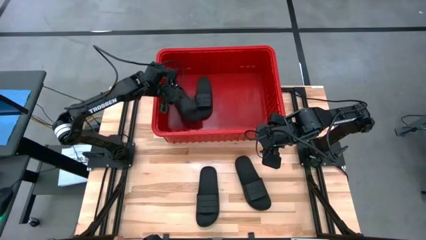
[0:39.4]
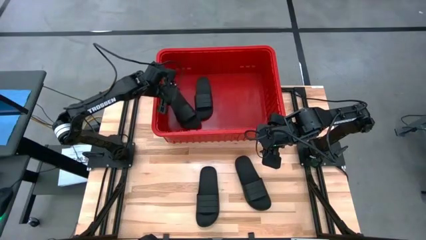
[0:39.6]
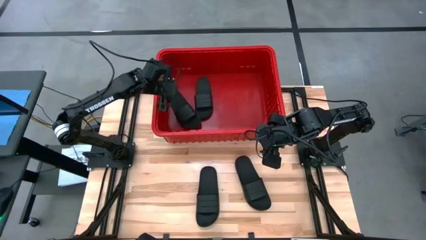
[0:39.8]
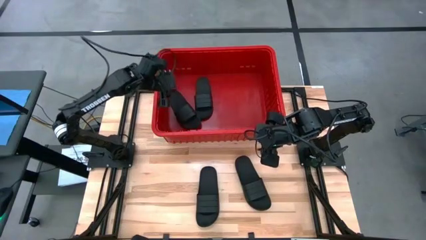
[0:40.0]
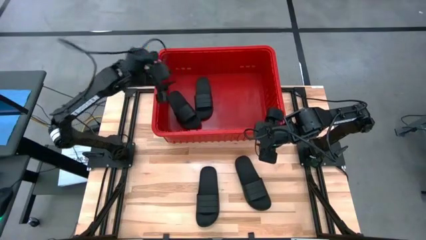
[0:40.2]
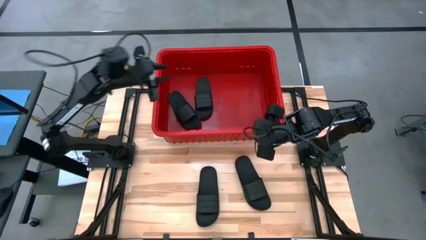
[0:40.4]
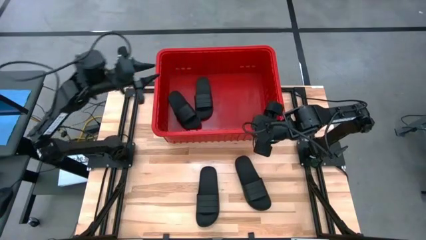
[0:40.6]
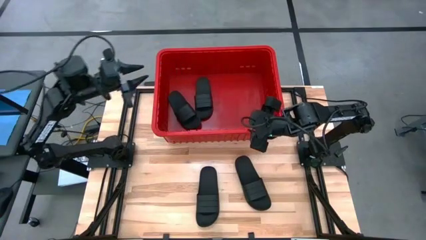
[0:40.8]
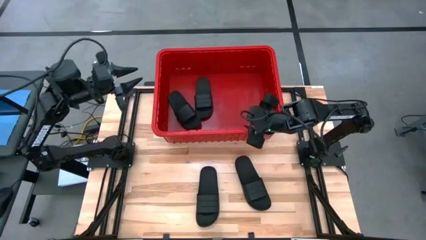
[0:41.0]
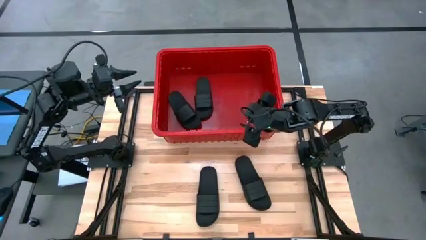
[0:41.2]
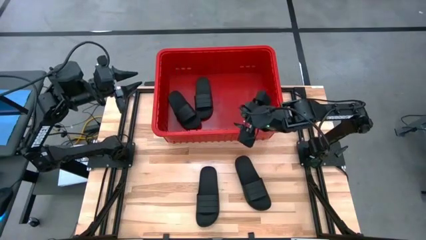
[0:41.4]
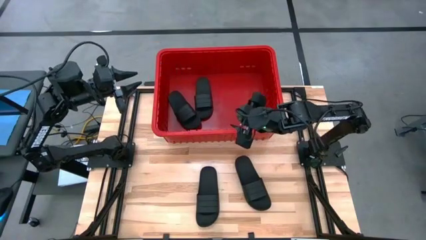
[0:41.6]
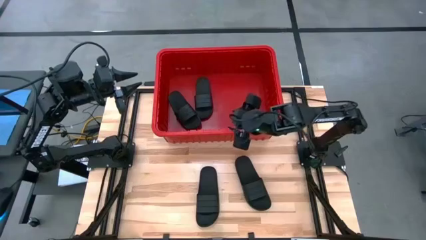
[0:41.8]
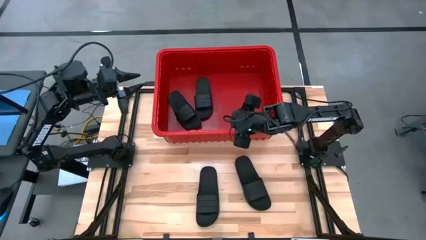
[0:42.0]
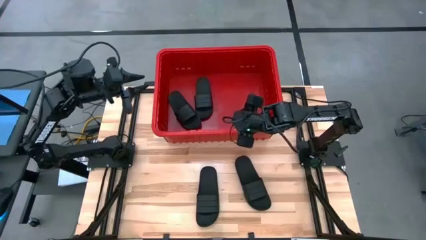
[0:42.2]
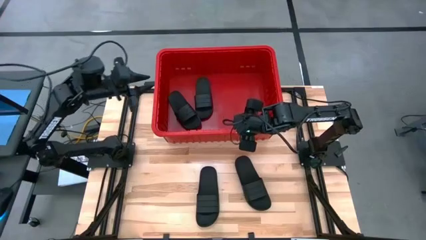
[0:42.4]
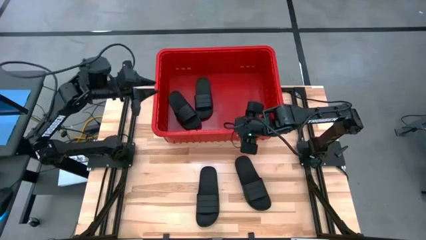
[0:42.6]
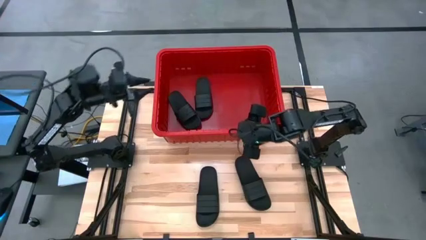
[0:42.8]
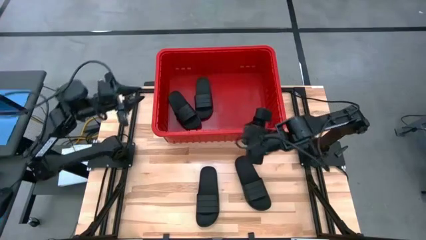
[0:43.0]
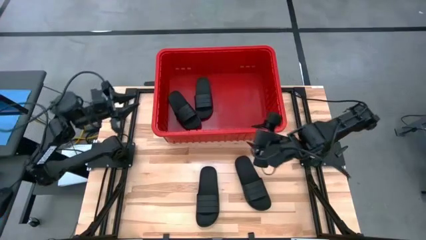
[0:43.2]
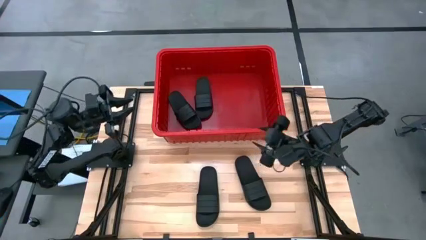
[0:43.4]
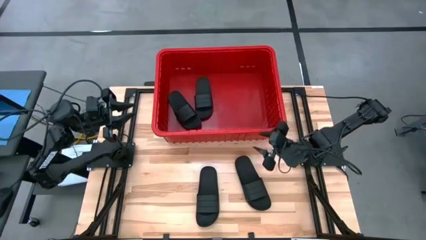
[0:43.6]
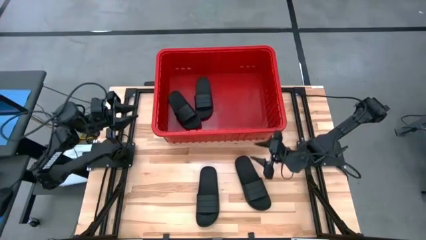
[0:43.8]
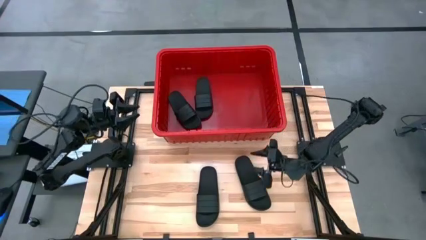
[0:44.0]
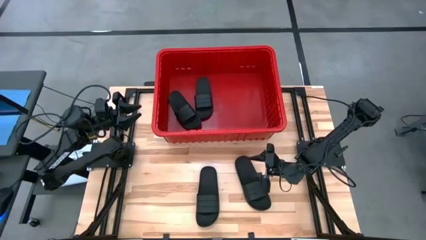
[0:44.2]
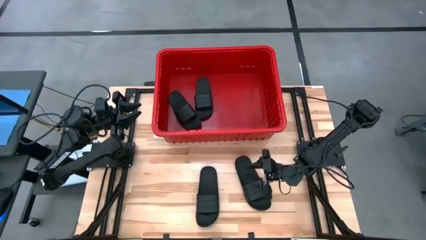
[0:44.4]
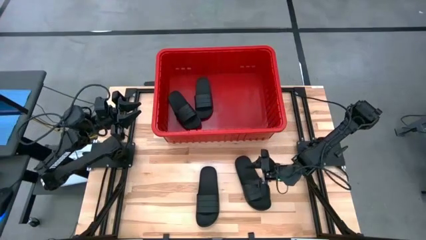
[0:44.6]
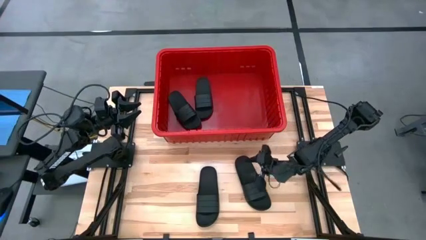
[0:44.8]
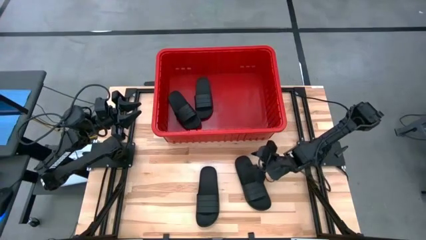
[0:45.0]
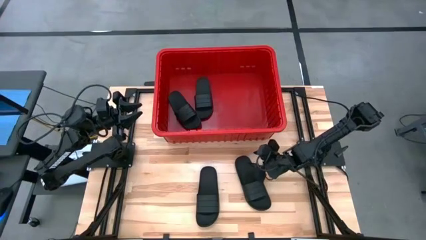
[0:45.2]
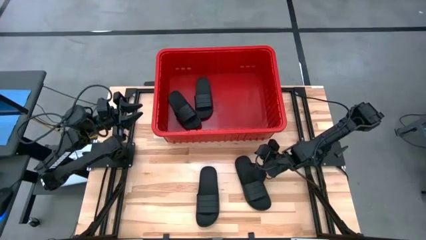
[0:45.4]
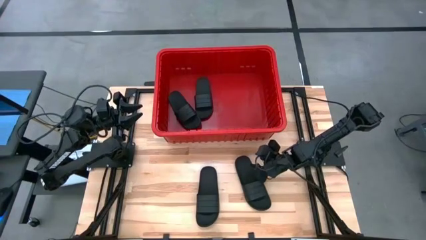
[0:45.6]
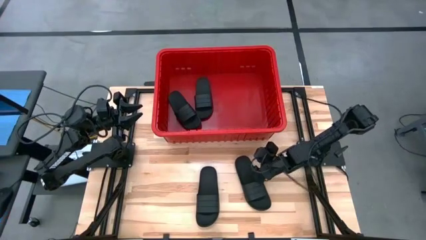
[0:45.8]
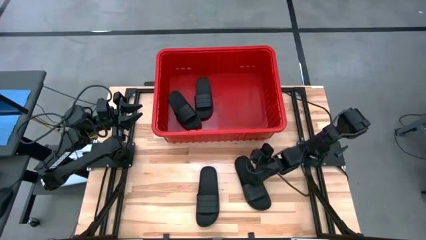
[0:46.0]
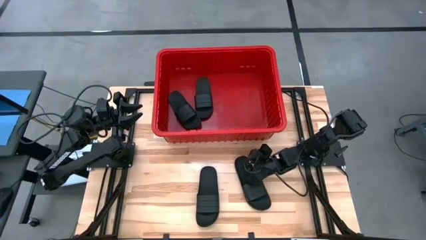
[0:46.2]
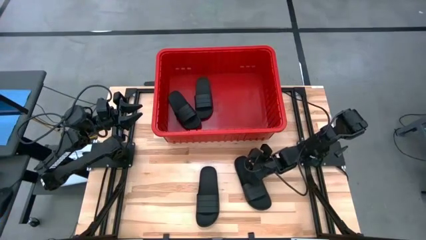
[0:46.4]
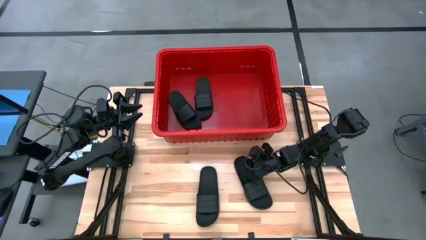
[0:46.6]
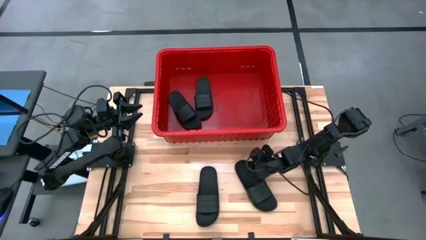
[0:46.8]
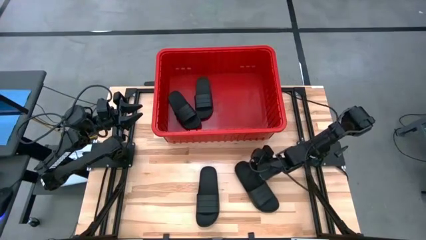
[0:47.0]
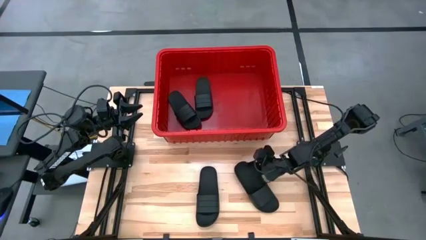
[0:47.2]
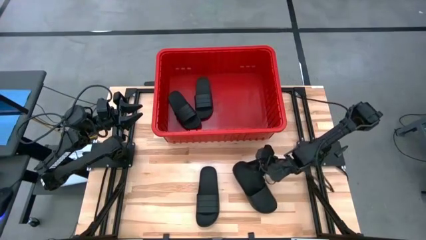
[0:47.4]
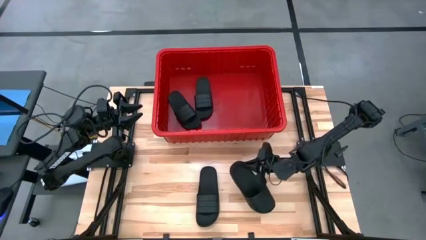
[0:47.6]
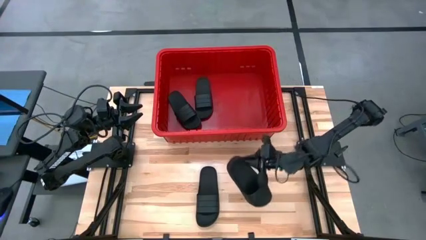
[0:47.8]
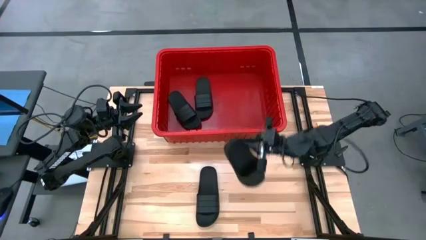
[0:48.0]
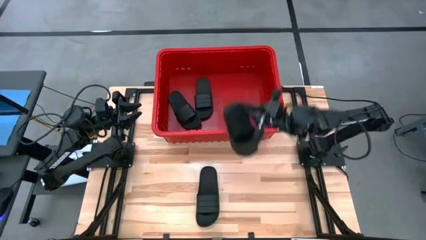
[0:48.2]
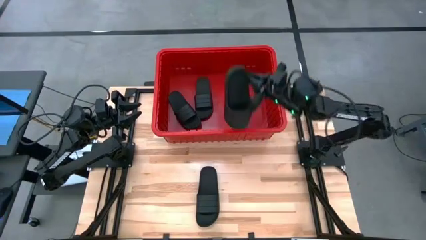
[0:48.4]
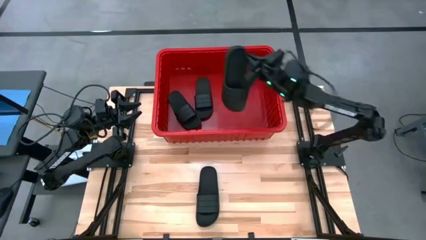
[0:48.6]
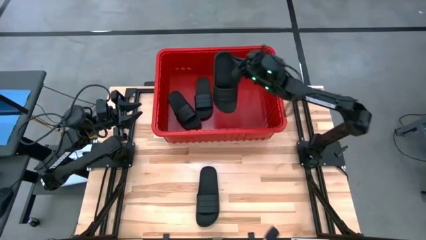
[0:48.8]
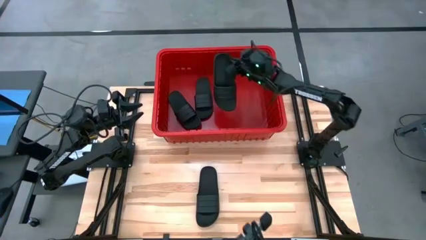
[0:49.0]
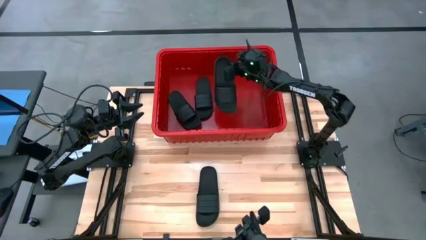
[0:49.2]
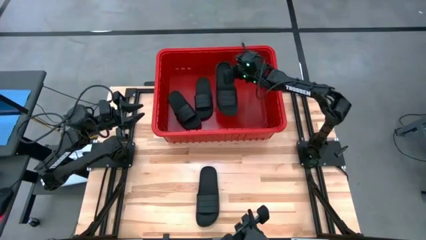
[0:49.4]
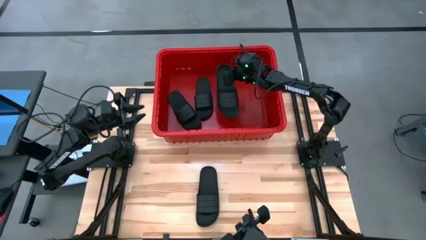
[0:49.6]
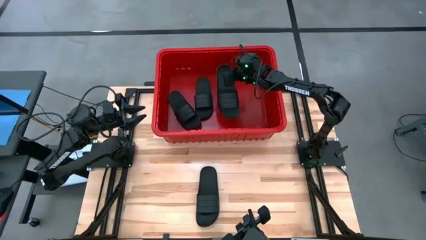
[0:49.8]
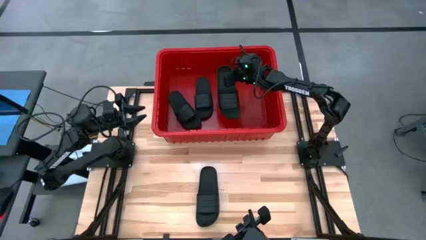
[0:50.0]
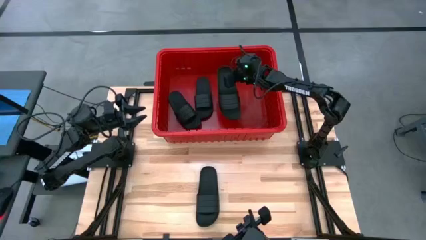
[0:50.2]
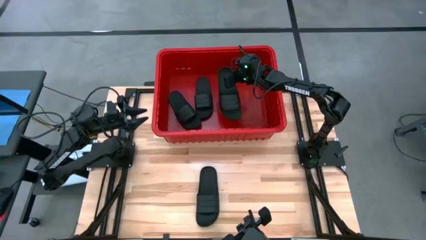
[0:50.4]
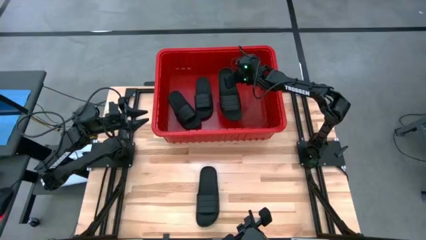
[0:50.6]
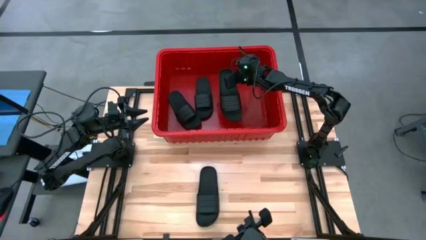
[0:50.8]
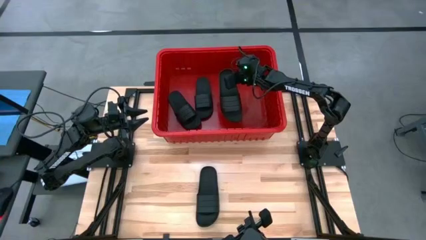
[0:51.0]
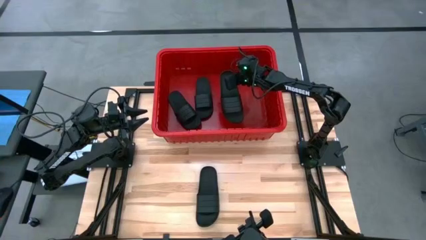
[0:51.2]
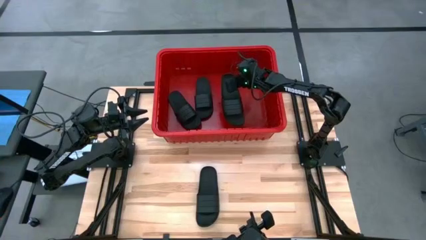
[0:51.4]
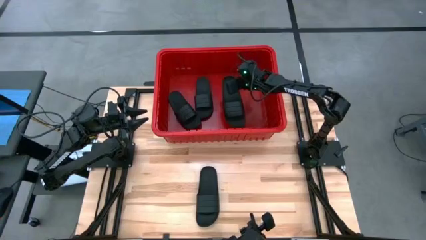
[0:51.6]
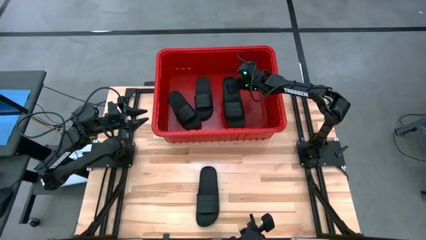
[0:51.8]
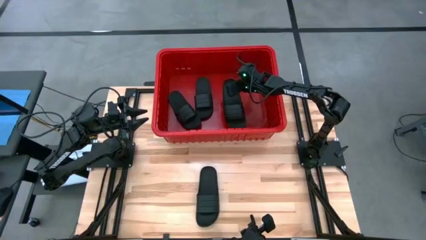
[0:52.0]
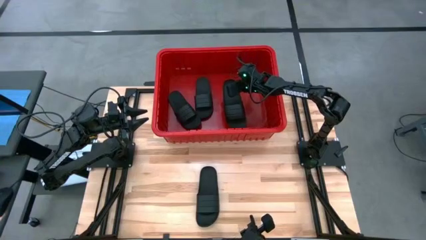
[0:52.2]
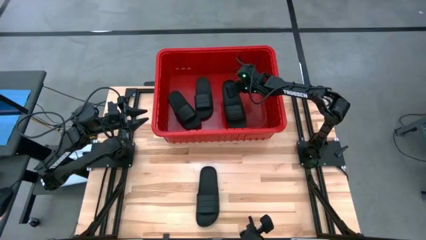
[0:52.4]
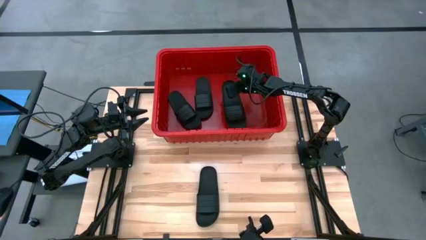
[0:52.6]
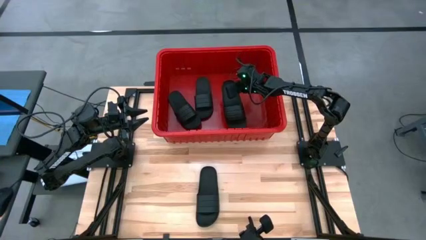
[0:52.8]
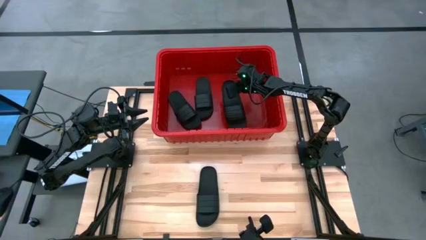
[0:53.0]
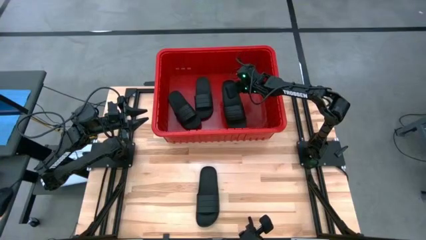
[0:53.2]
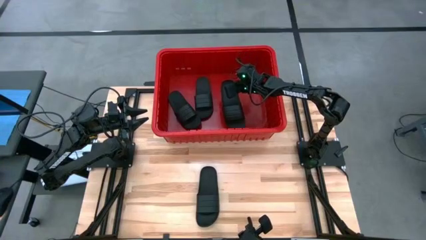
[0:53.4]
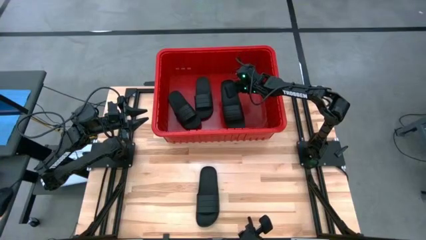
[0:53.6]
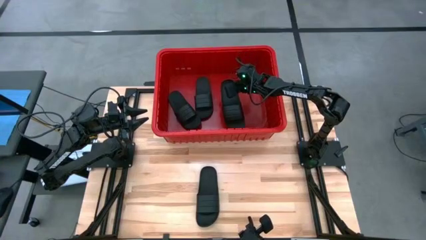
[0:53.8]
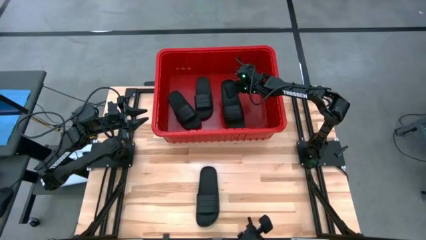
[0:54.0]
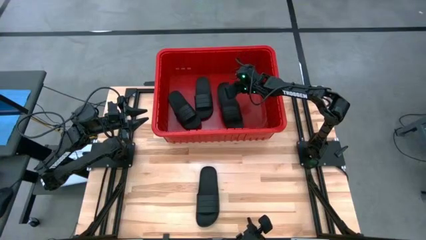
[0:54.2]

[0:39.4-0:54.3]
Task: Pick and place slides into bin
Put the black slide into the red container
